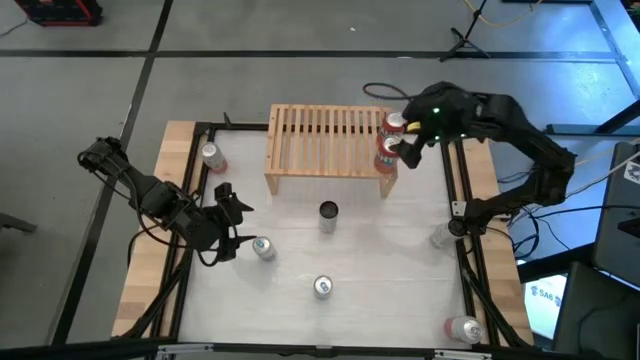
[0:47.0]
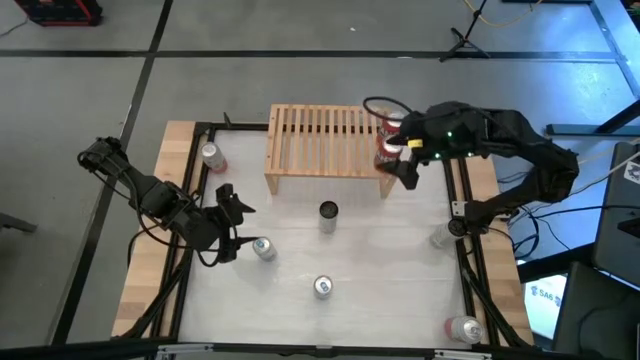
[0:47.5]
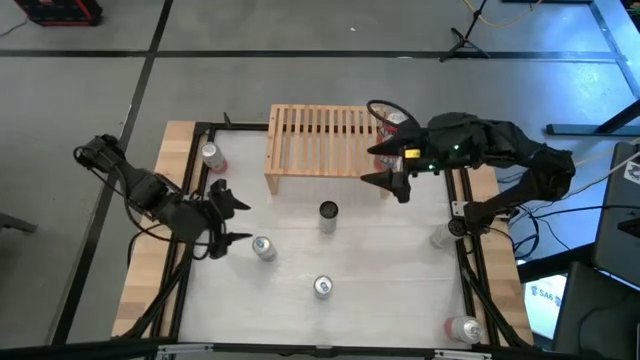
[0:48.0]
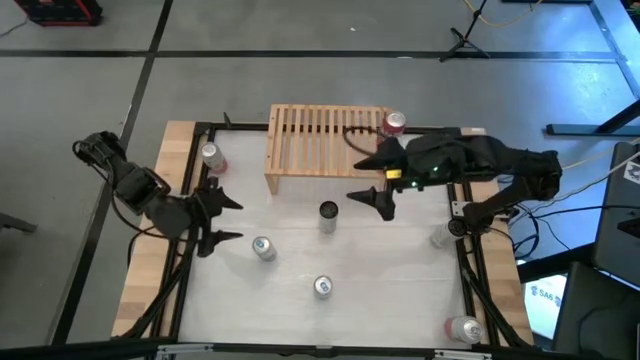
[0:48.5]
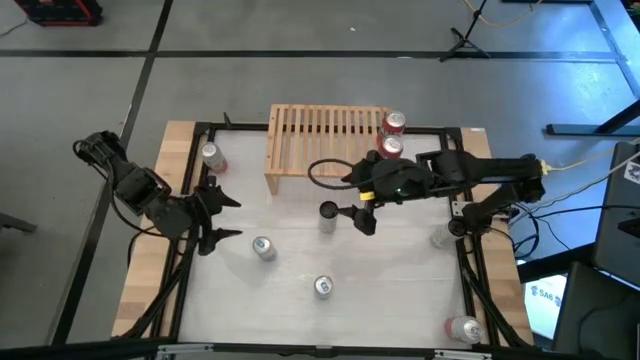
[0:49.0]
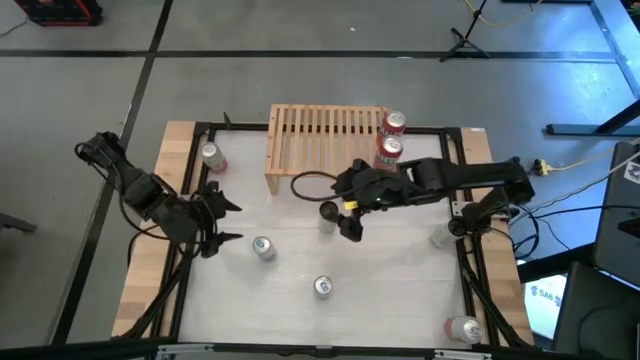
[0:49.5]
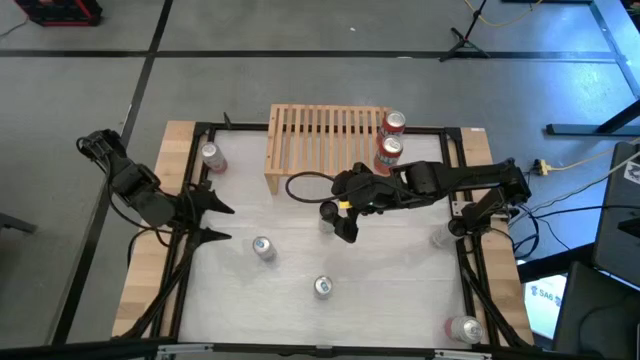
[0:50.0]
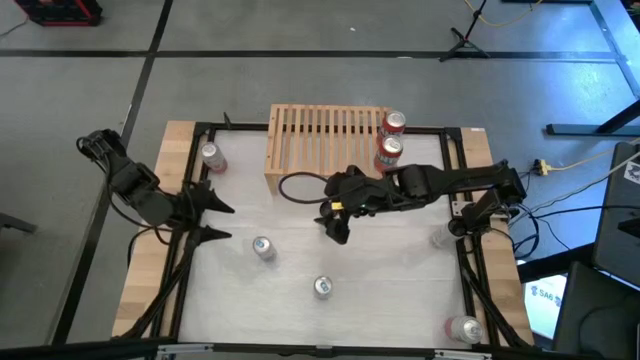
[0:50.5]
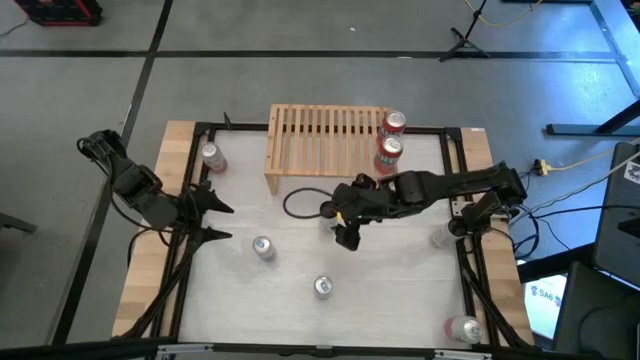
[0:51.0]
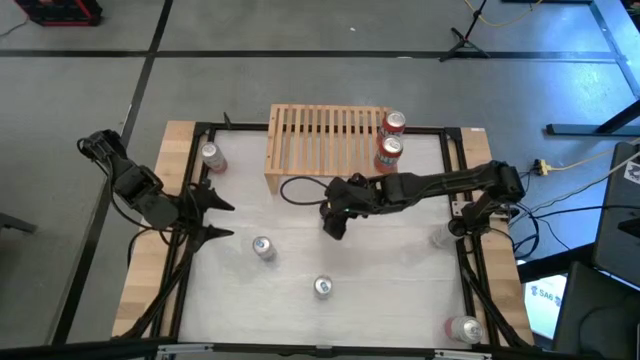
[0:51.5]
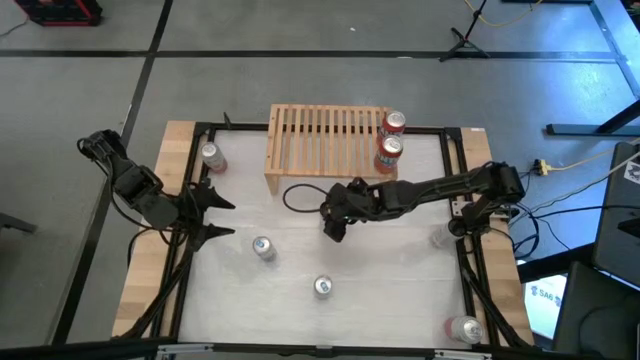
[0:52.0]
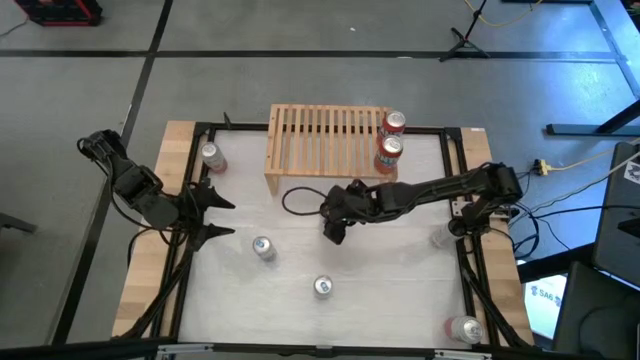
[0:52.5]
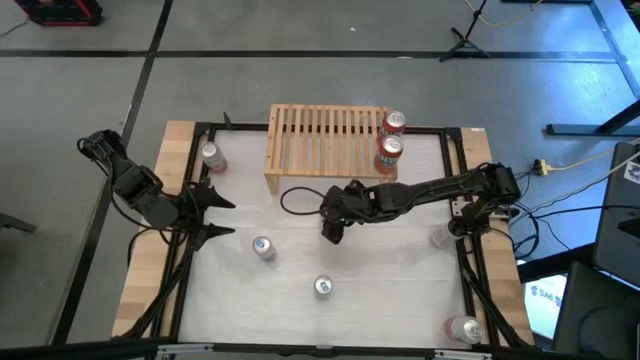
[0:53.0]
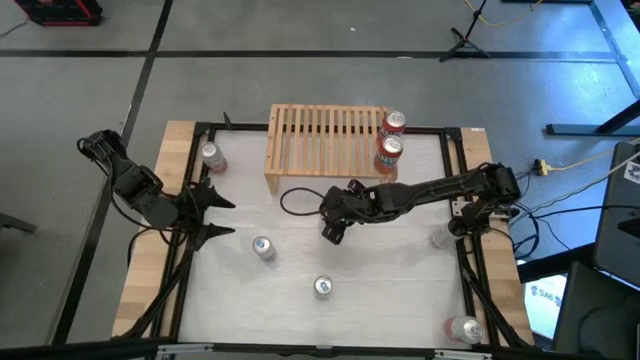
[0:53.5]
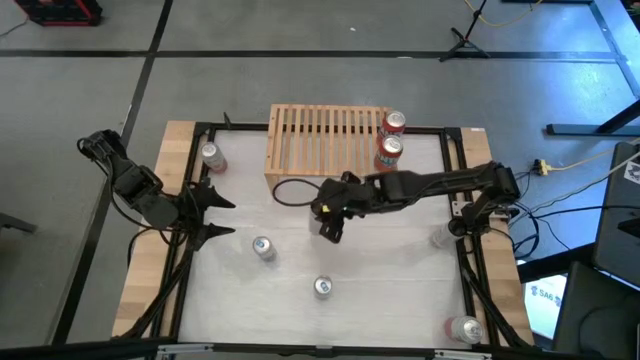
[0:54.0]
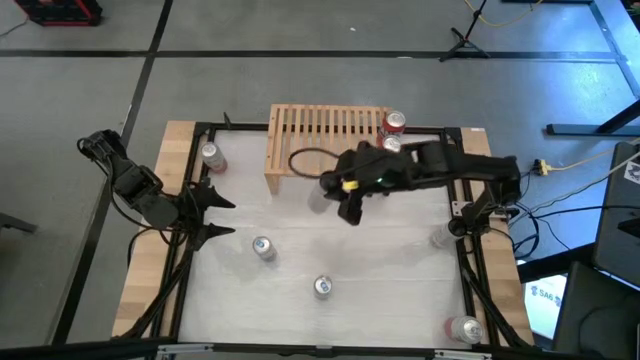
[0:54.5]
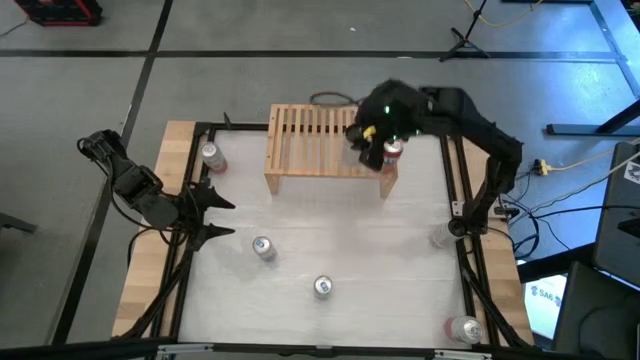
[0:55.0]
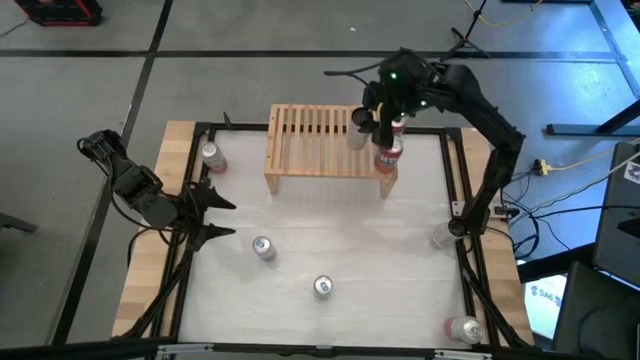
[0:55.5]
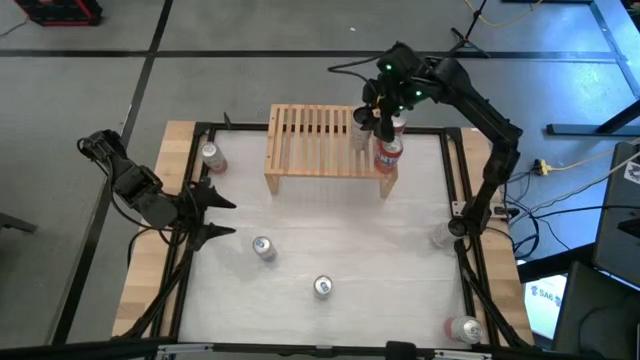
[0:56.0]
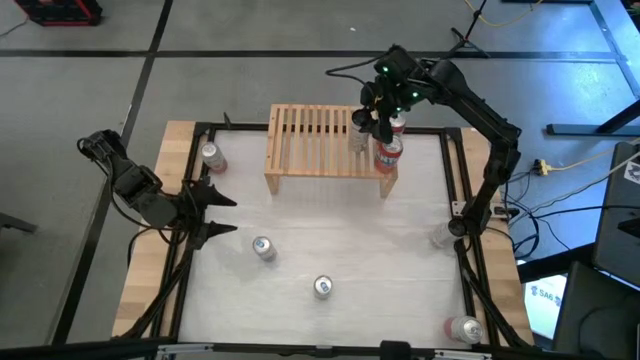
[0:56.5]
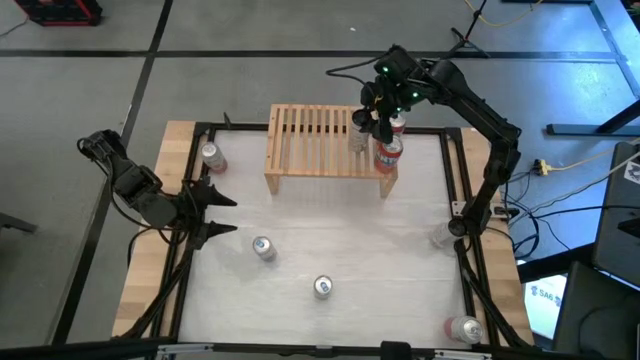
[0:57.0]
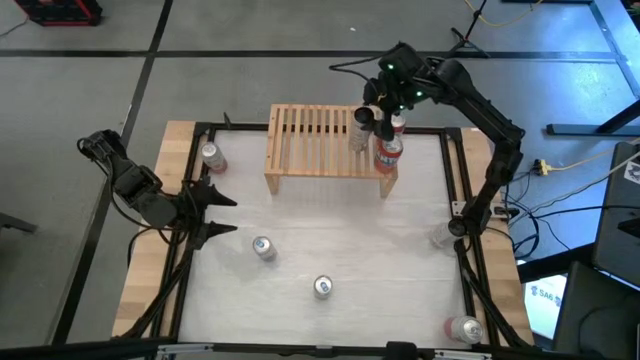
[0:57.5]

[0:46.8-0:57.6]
Task: Place canned beverage on shelf
Put the left white yellow soda can on the shelf

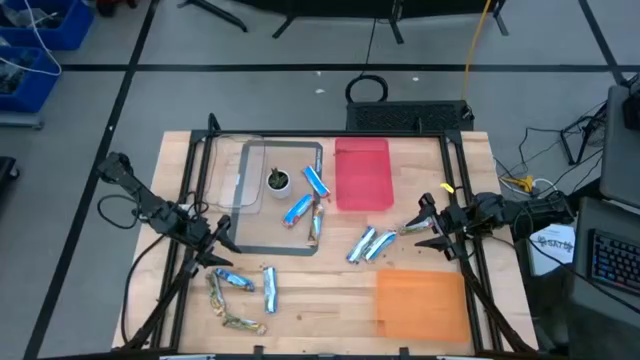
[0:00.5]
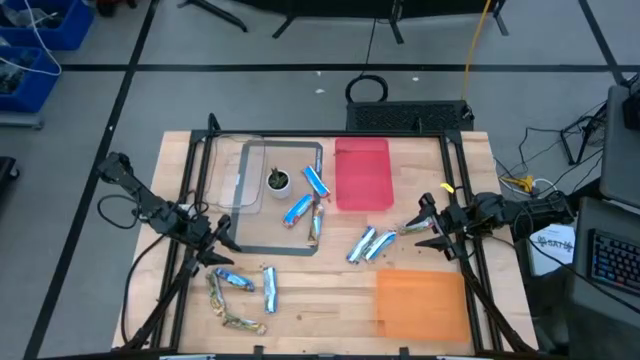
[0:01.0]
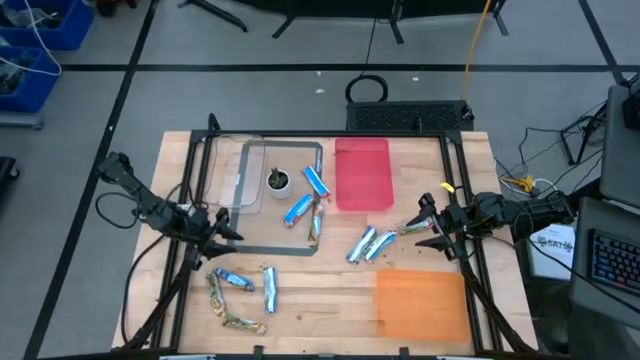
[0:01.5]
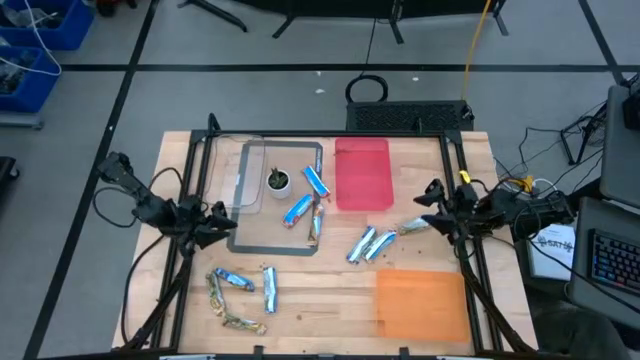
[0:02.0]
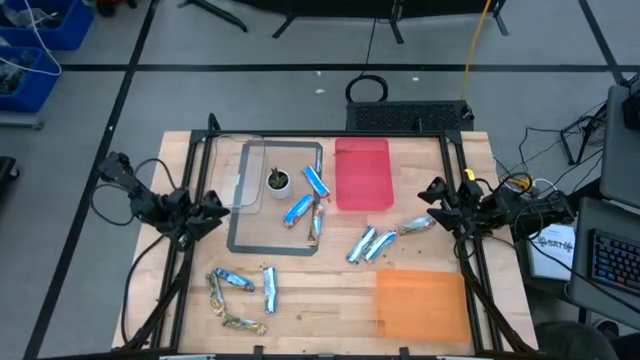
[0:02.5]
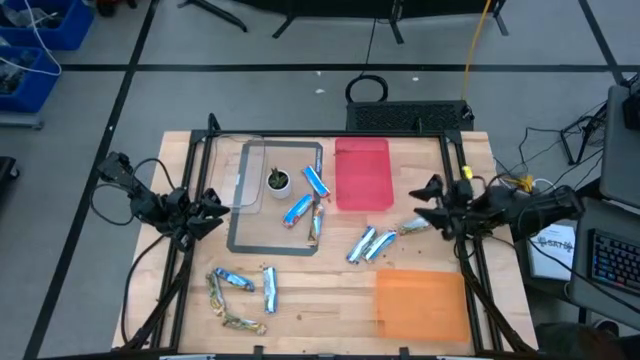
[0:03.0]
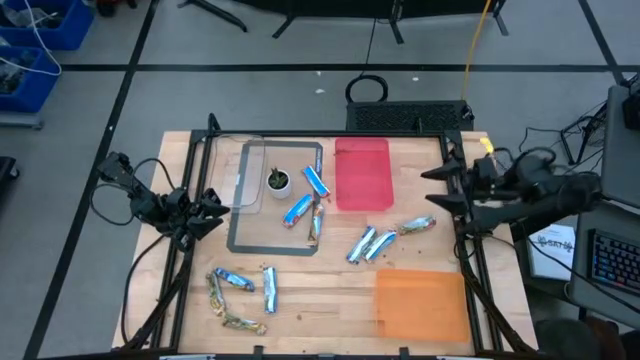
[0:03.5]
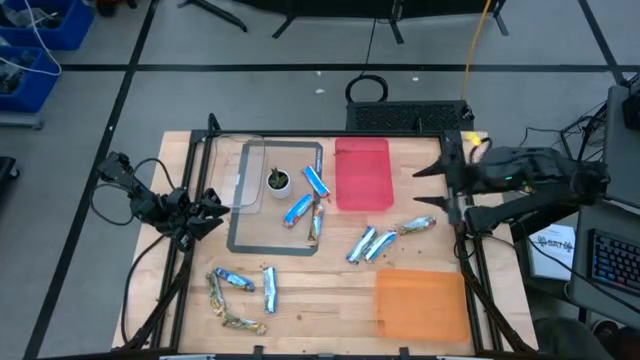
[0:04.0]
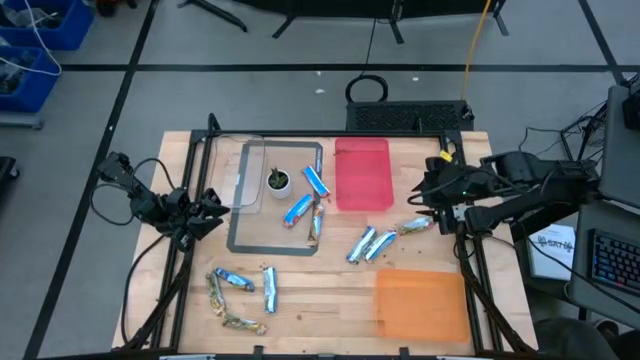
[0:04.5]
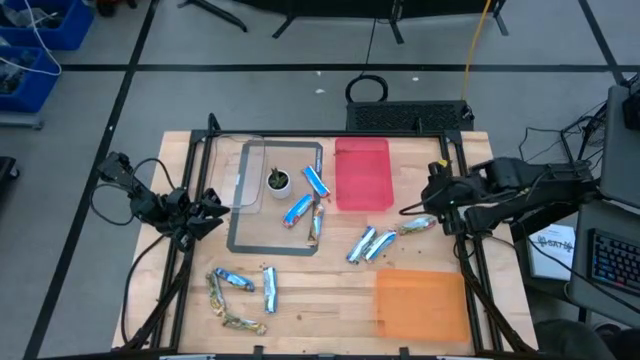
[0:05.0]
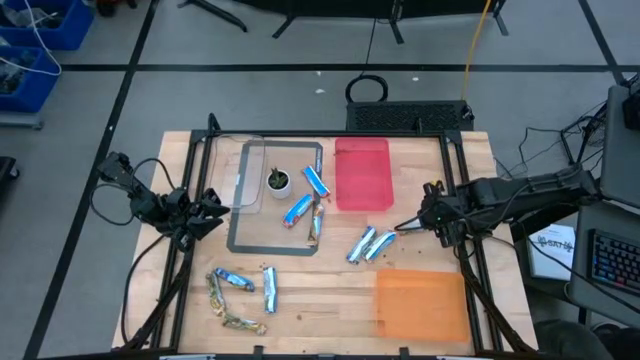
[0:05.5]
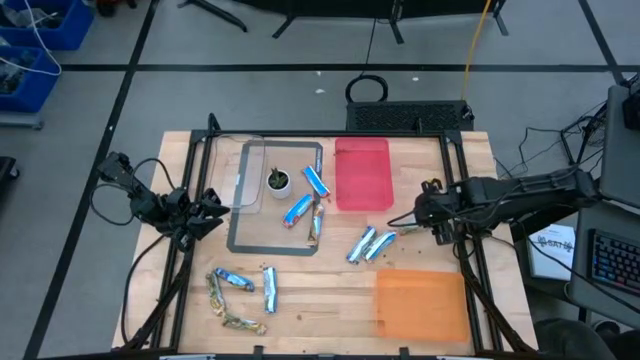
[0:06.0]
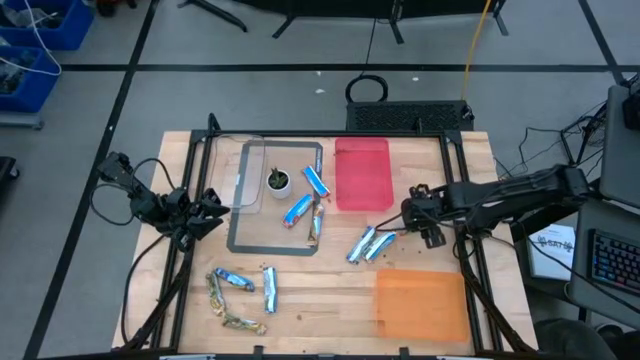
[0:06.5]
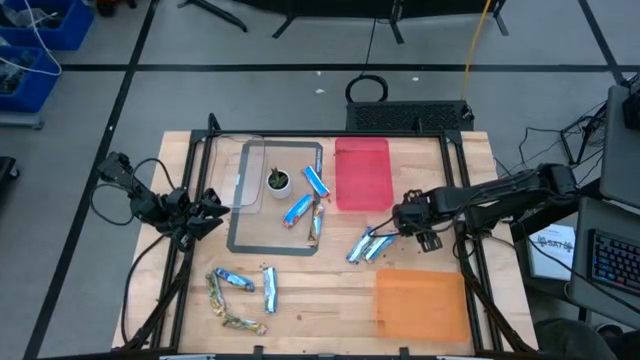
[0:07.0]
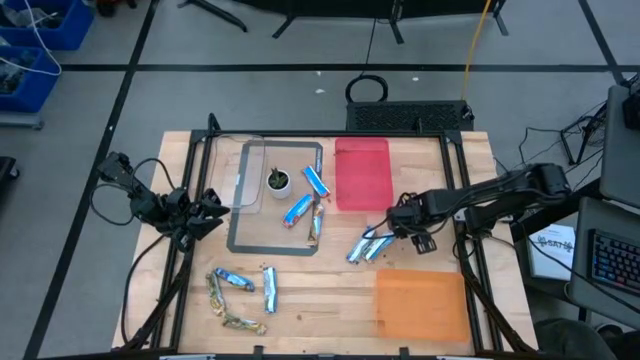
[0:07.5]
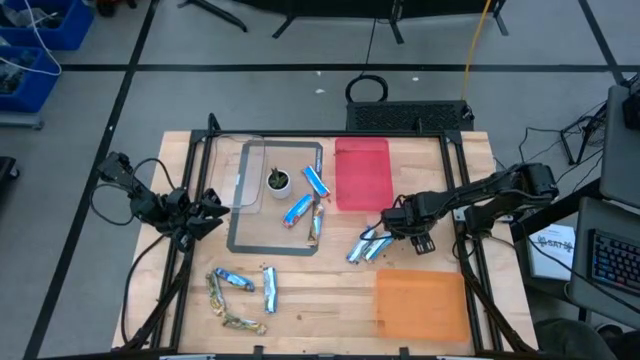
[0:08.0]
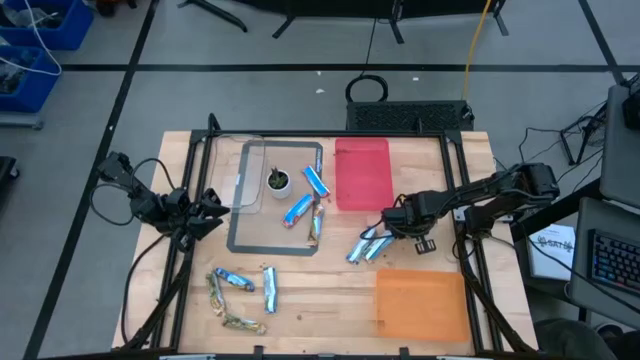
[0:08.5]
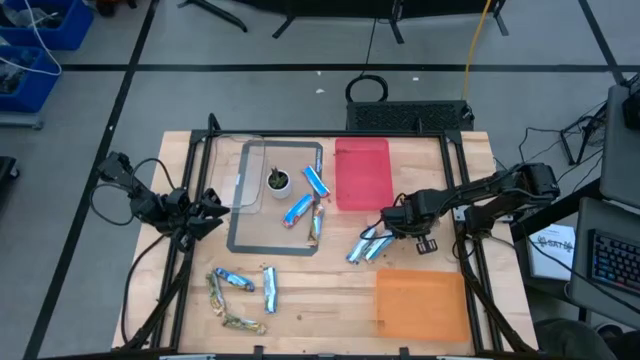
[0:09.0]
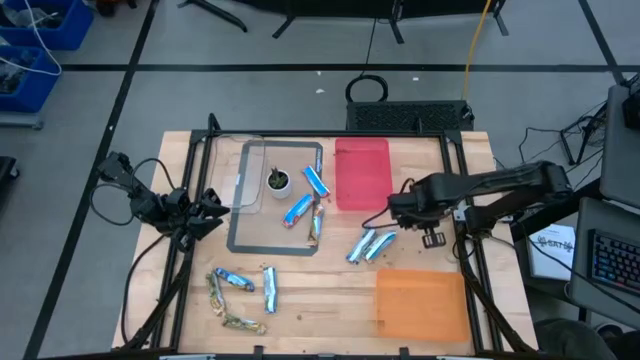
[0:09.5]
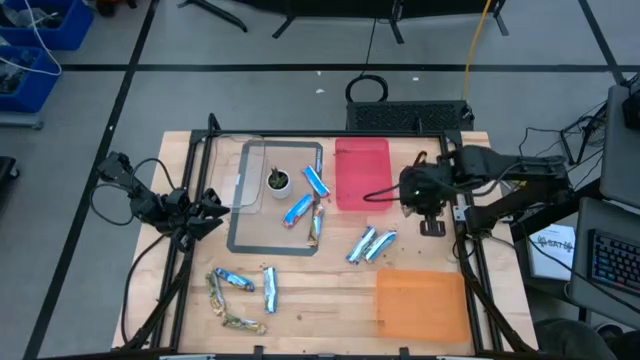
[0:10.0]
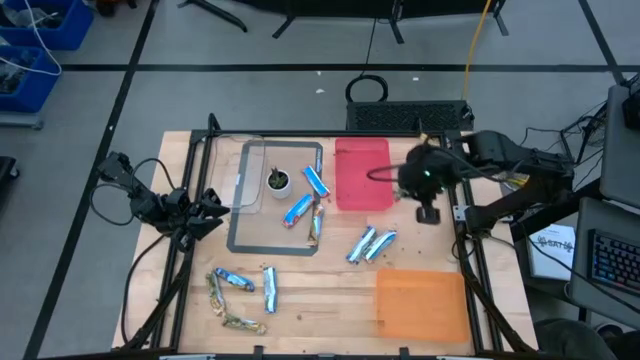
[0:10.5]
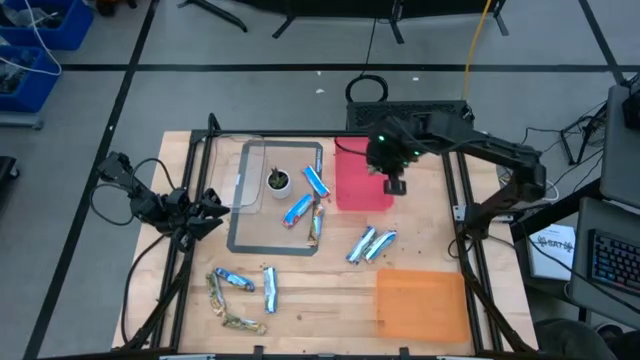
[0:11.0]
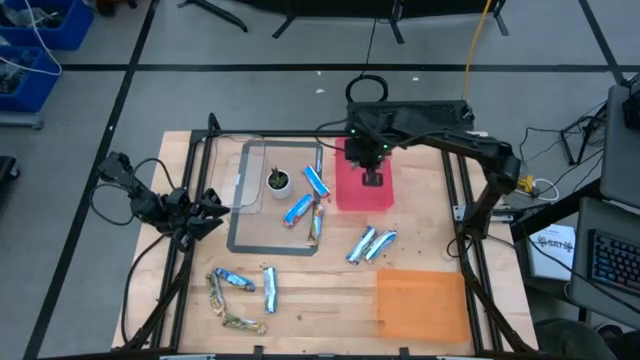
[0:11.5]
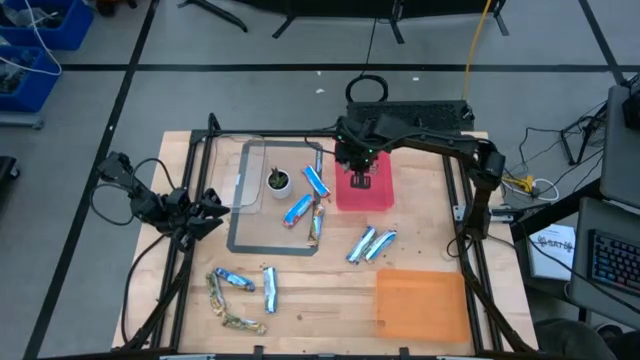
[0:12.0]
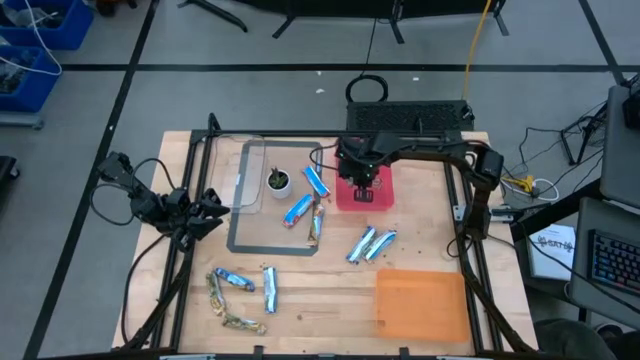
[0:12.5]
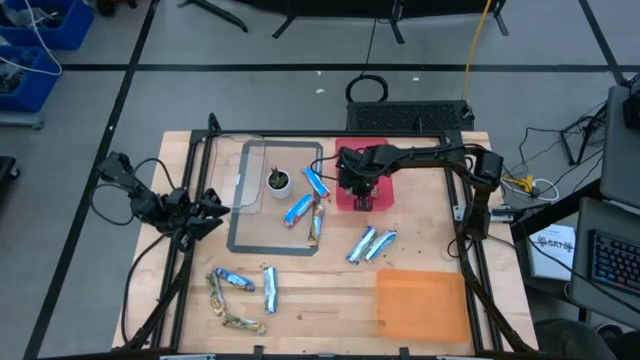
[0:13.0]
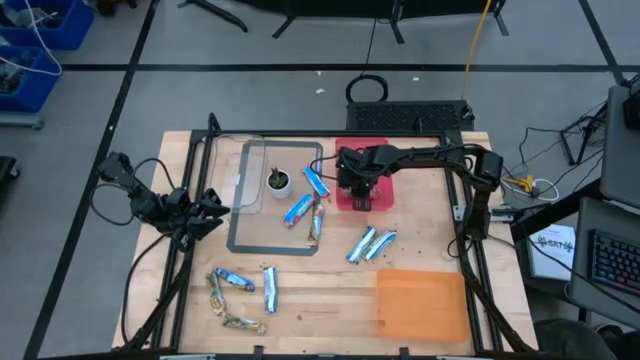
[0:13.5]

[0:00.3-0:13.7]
Task: Pick and place Granola Bars by type
Put the red granola bar into the red bin
